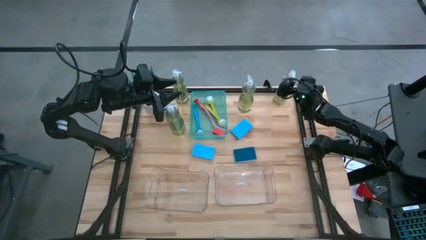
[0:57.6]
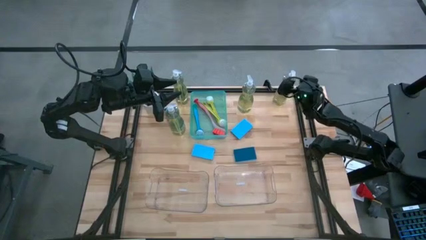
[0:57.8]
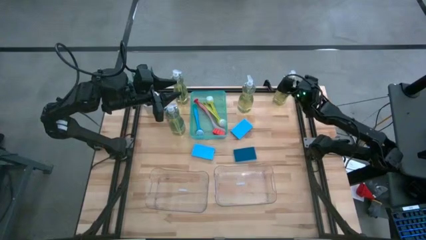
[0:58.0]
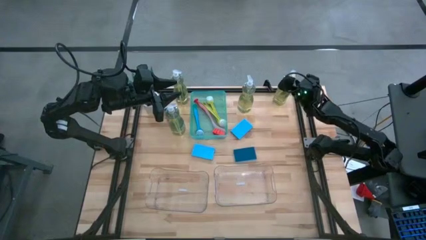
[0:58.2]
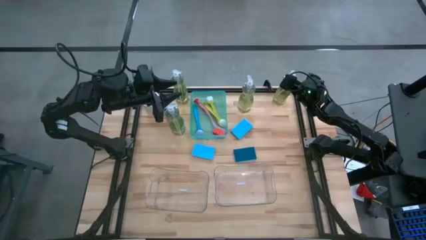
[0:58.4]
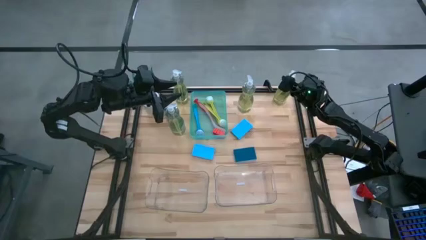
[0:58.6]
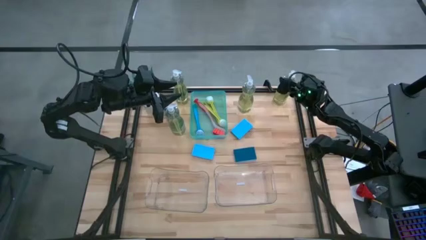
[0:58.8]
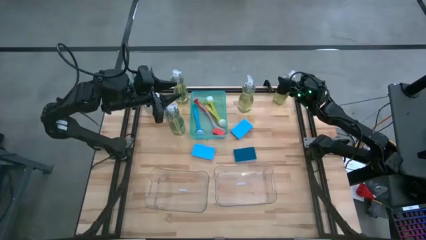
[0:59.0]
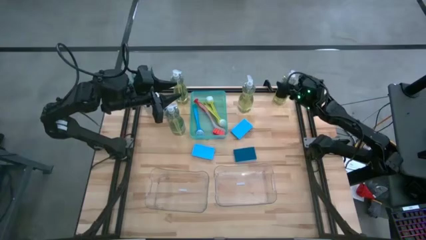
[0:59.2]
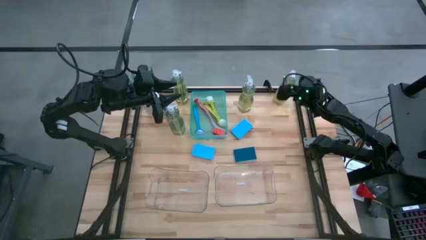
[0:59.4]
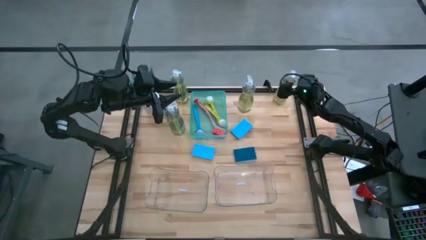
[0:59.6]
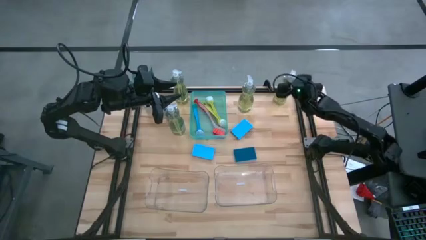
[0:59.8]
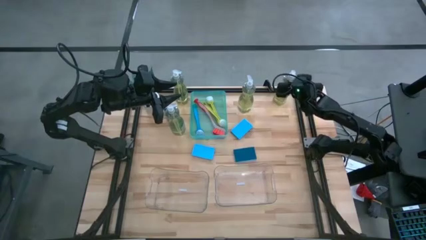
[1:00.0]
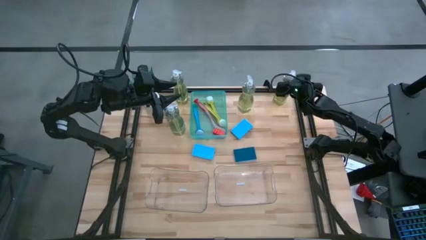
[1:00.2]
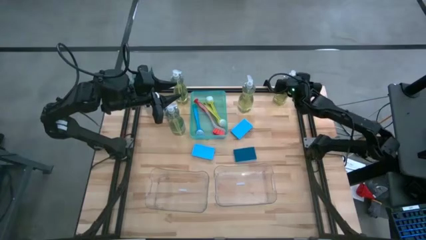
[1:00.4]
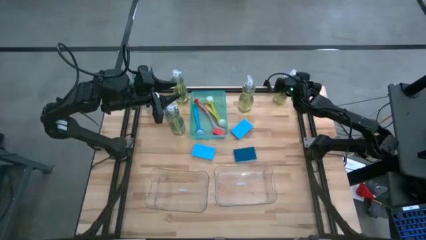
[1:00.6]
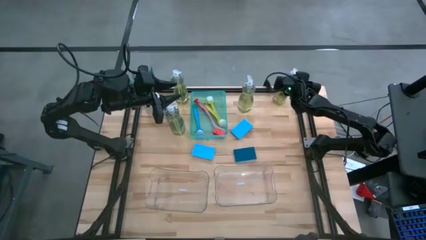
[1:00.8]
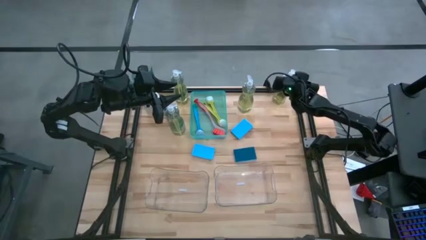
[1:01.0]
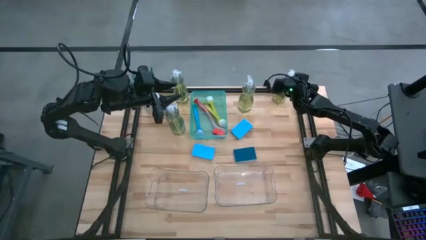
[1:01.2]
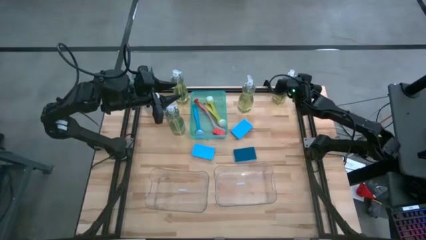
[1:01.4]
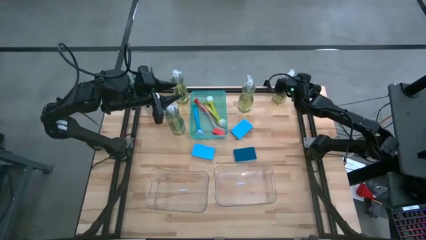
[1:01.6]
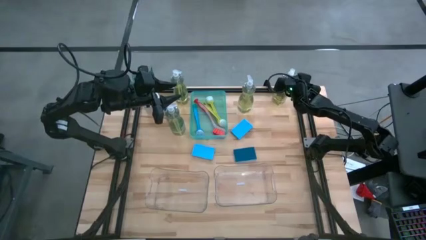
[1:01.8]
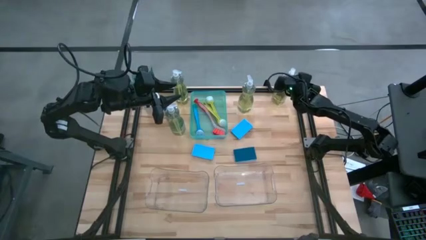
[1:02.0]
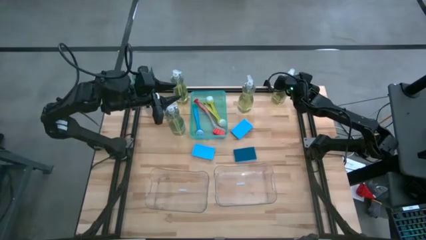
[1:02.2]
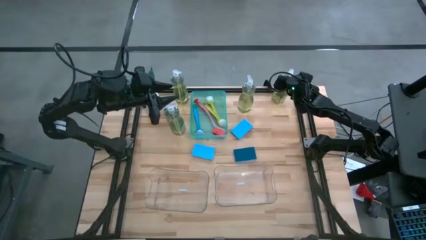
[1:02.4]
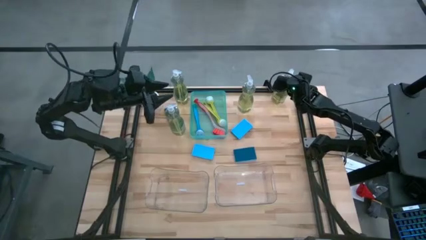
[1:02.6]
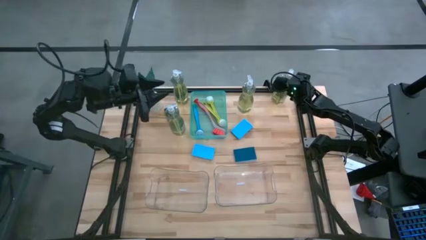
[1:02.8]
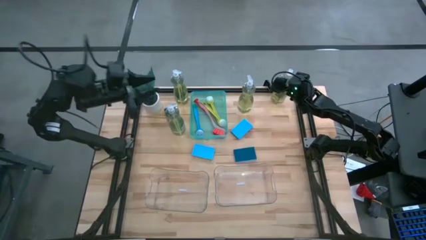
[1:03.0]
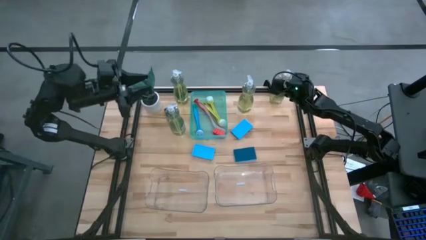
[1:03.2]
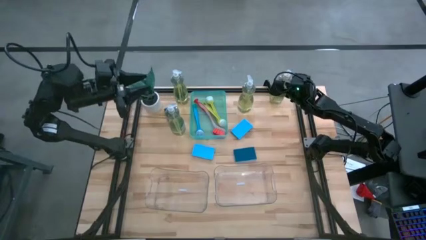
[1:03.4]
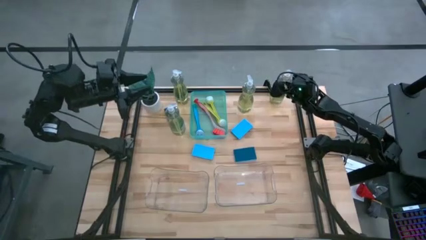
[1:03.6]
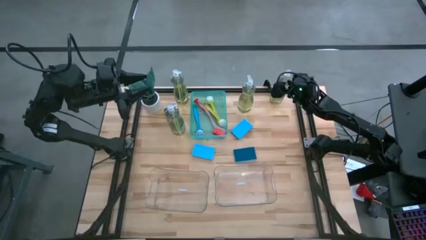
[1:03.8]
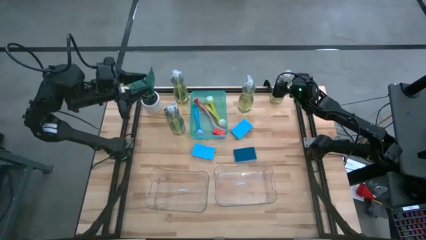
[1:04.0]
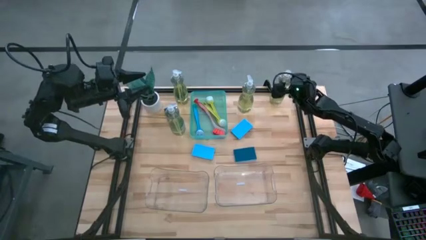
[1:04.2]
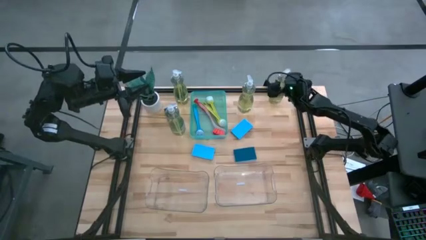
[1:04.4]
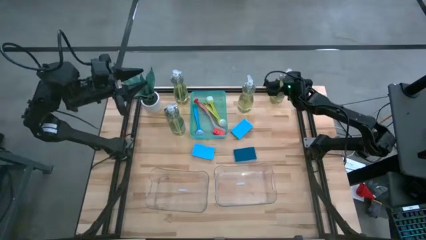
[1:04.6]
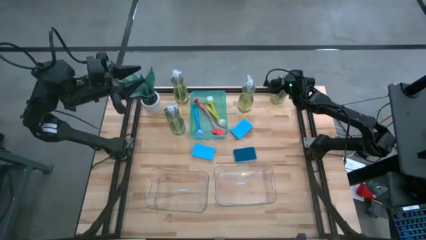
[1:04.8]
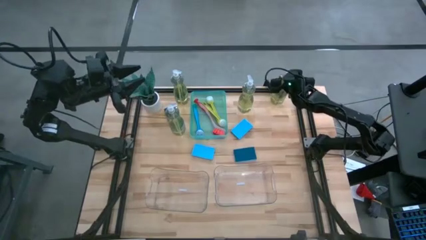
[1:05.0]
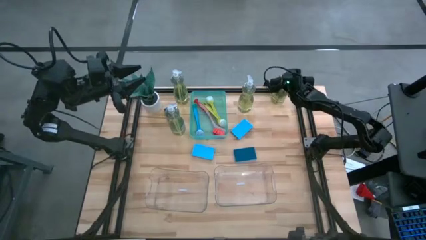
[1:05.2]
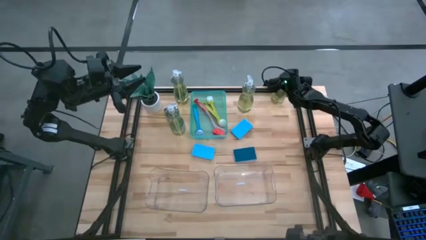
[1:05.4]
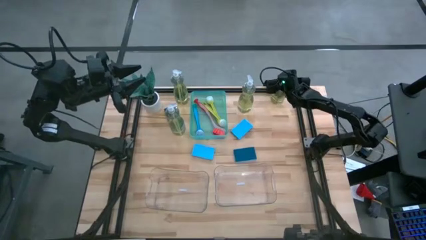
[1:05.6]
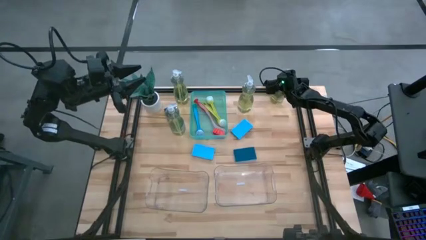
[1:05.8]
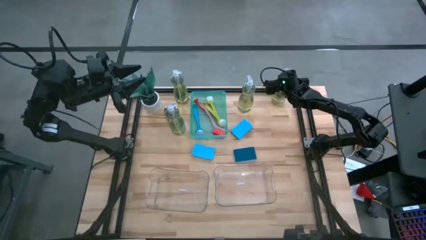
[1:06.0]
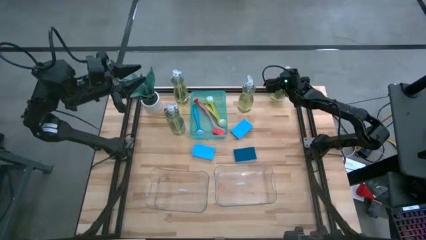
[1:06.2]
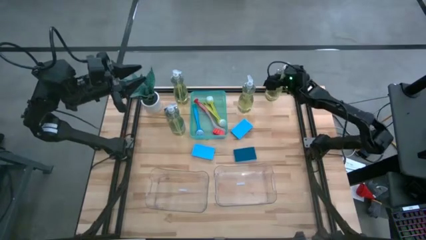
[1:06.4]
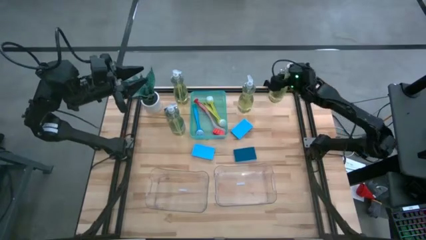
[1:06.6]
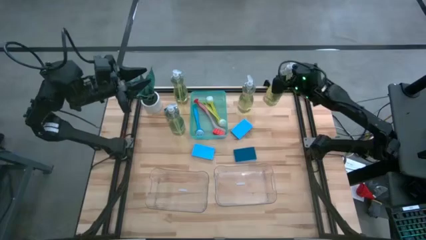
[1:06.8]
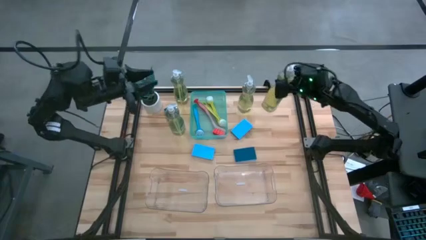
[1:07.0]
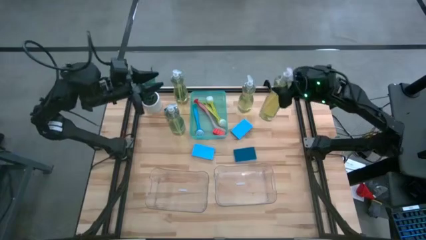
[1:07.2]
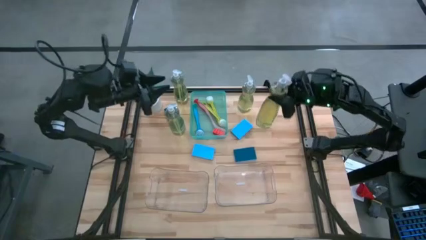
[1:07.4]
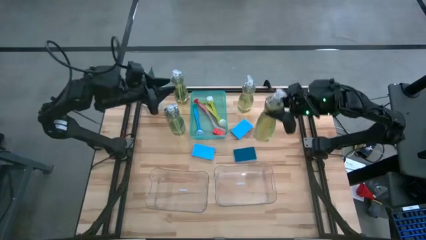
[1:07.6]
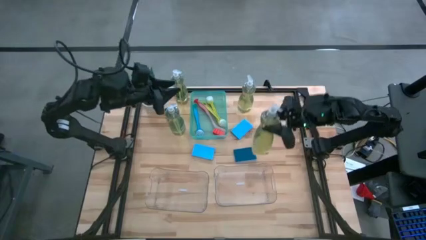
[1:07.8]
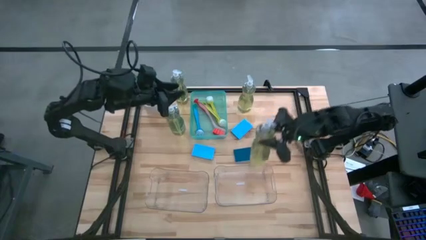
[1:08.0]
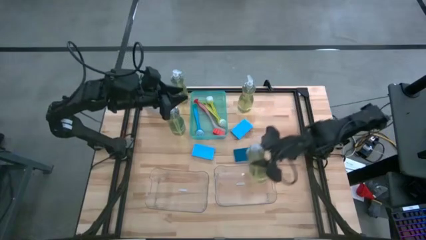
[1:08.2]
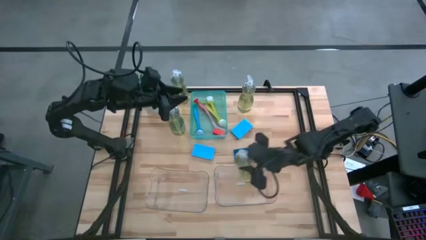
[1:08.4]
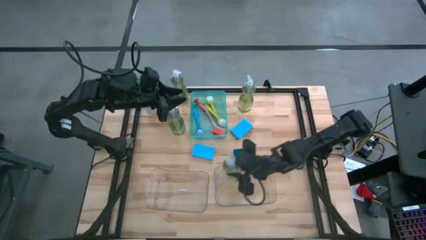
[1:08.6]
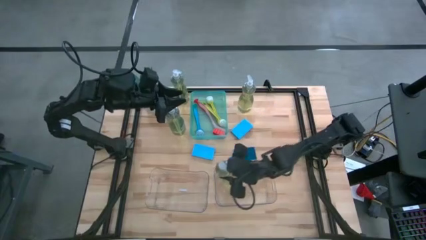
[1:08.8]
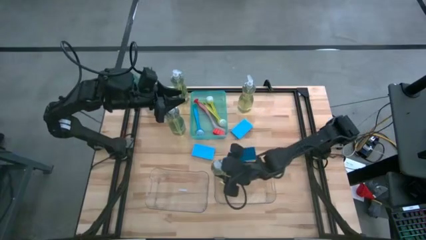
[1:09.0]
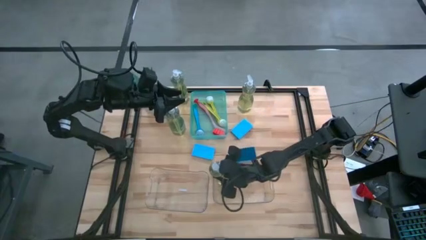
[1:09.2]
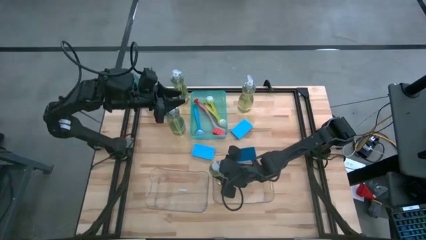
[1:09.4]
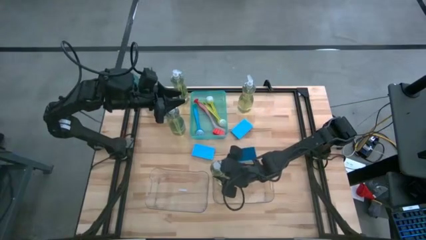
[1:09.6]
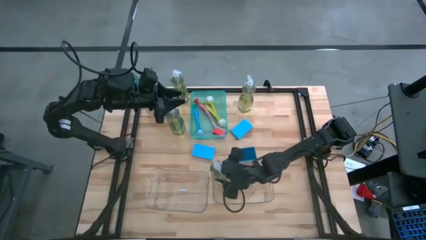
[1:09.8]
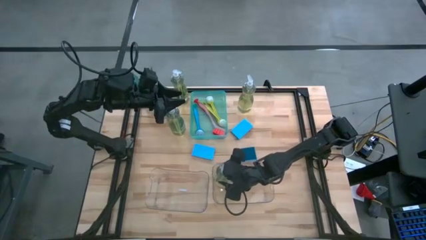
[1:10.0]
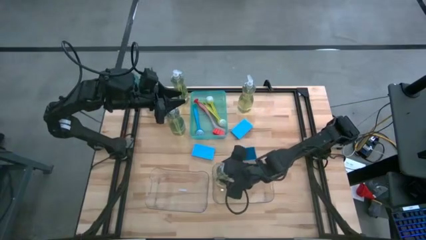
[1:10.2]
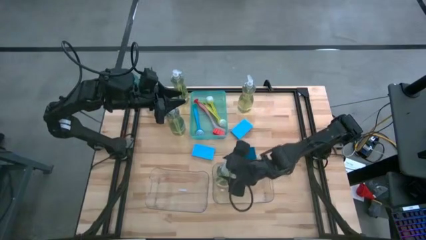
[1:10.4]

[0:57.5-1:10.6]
Task: Pick & Place Kitchen Sink Supplies
Put the soap dispenser into the right transparent bin

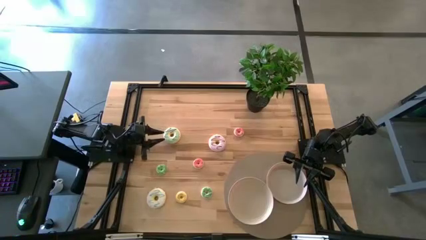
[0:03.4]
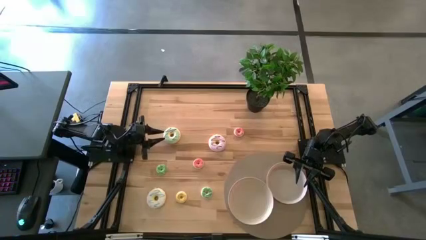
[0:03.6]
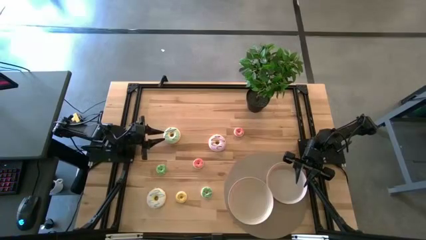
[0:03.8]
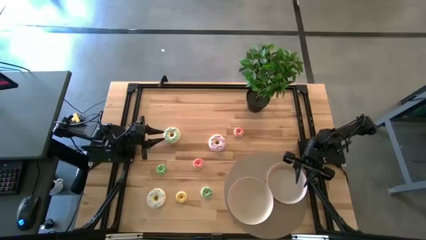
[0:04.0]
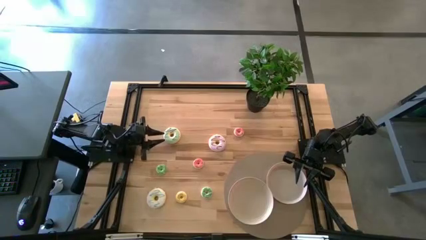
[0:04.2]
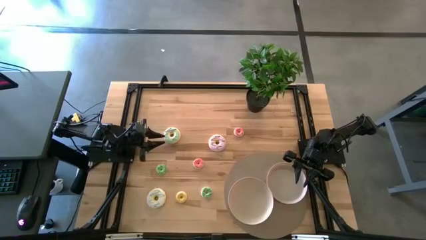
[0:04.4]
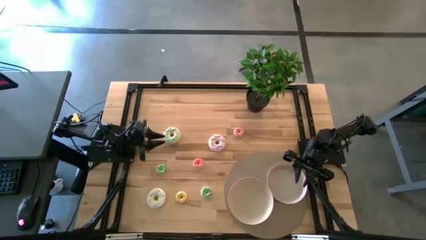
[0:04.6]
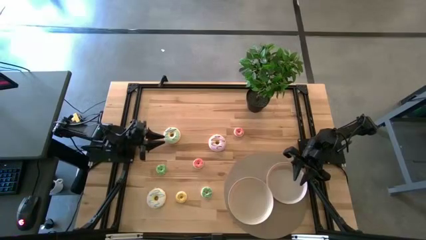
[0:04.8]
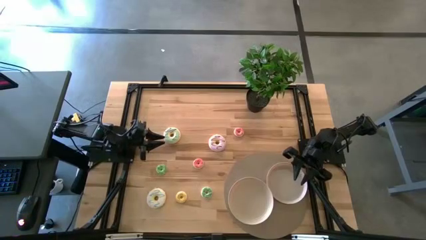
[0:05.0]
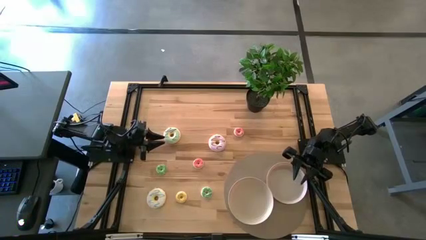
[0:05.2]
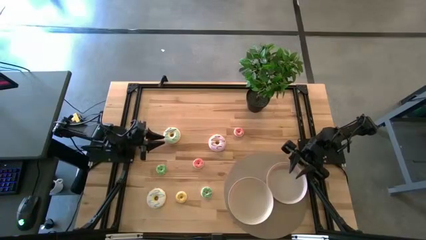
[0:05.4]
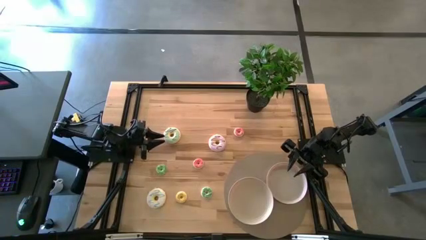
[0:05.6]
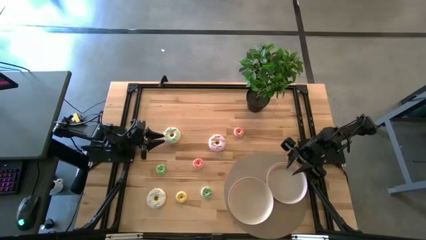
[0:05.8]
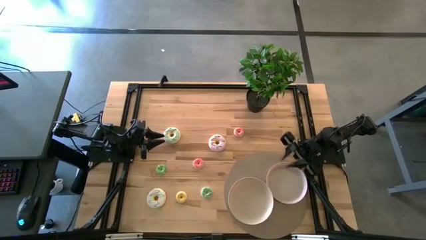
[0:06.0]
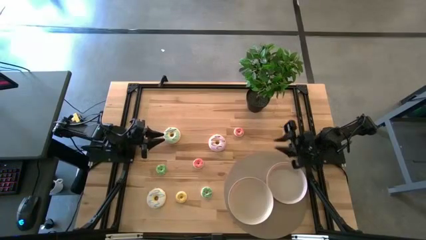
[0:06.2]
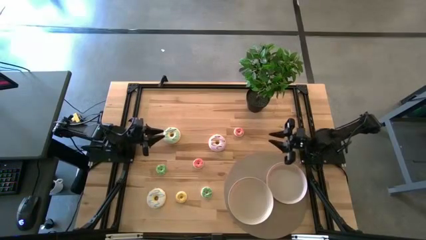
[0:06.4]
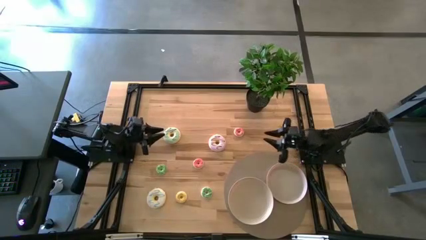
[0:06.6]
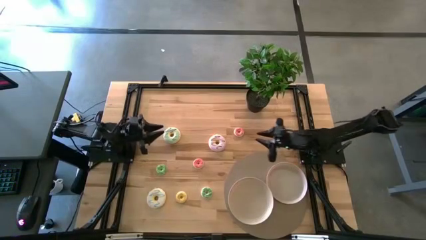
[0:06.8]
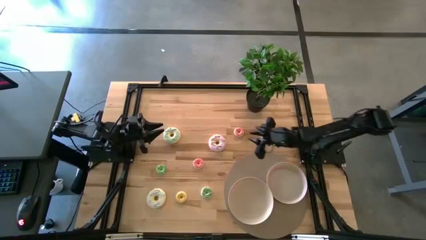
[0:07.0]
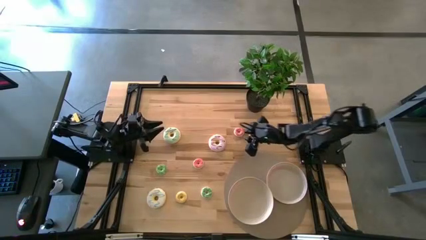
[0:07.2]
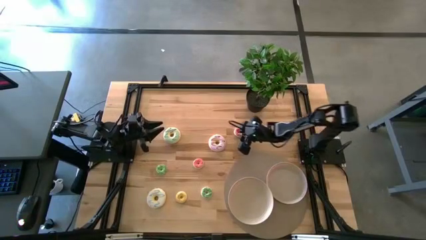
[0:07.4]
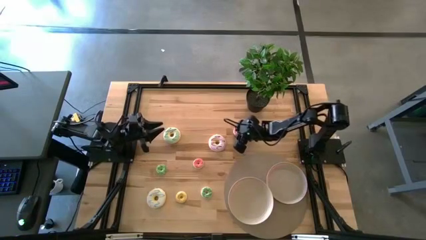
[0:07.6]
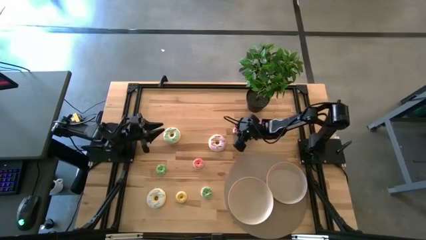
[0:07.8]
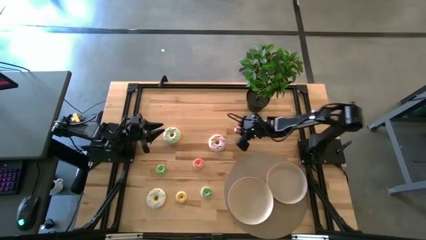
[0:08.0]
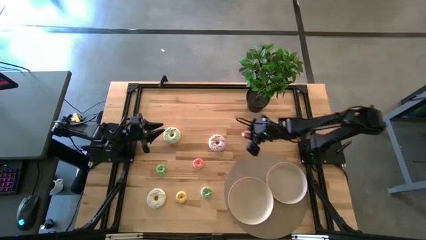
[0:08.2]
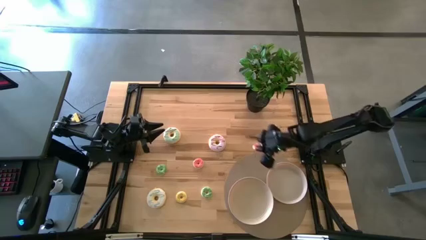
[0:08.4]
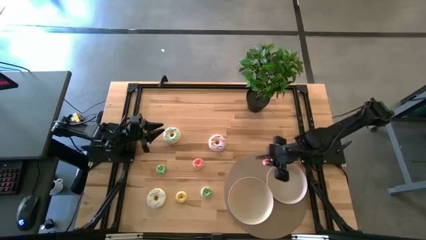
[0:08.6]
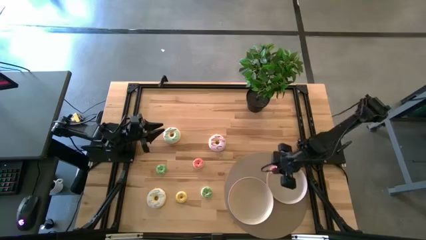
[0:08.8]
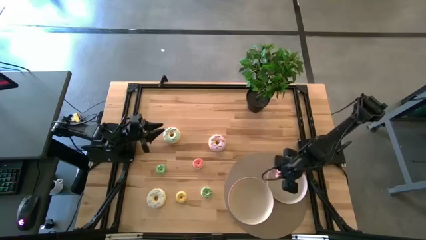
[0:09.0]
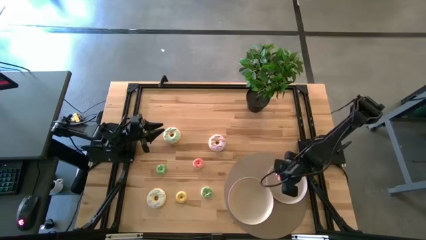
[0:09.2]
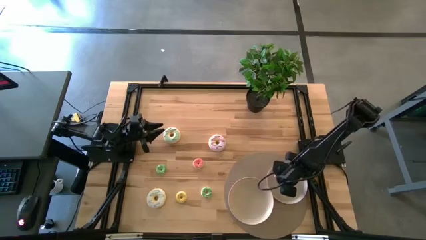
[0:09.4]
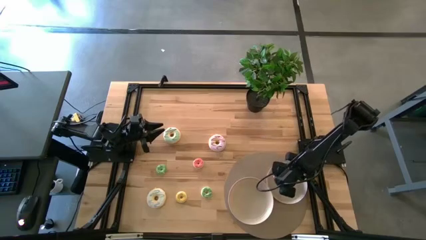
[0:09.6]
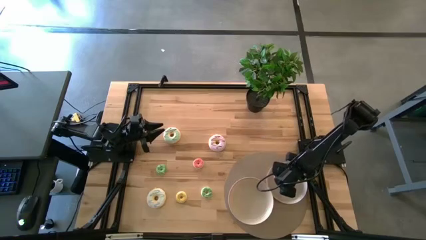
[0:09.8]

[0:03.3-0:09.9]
Task: Pick & Place donuts
Put the top small pink donut into the right white plate
